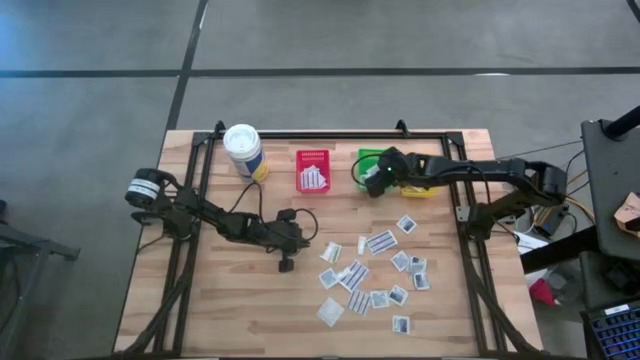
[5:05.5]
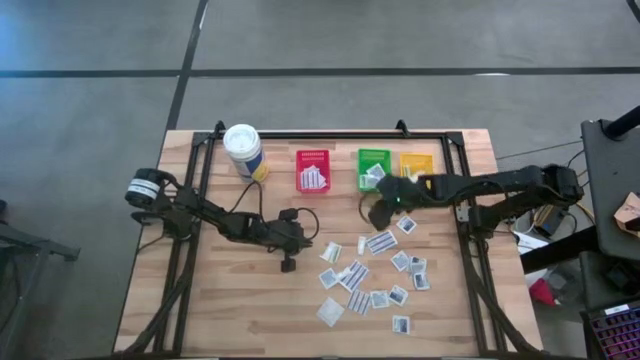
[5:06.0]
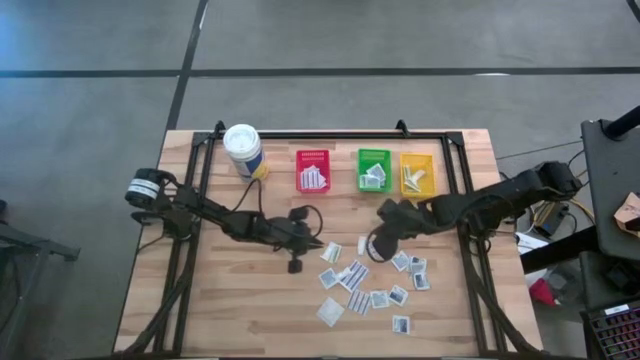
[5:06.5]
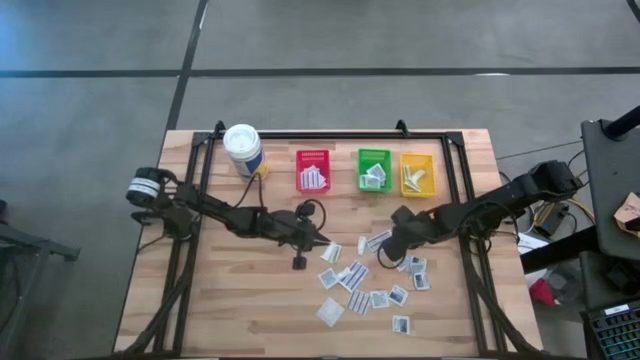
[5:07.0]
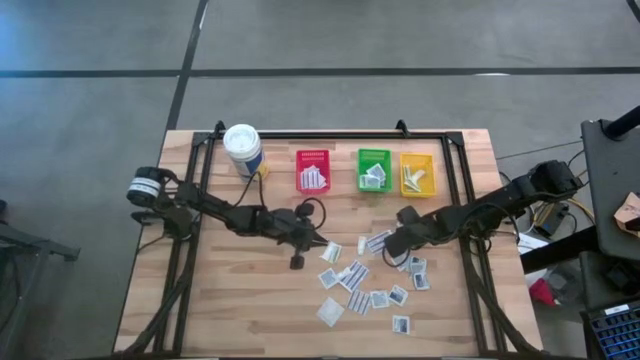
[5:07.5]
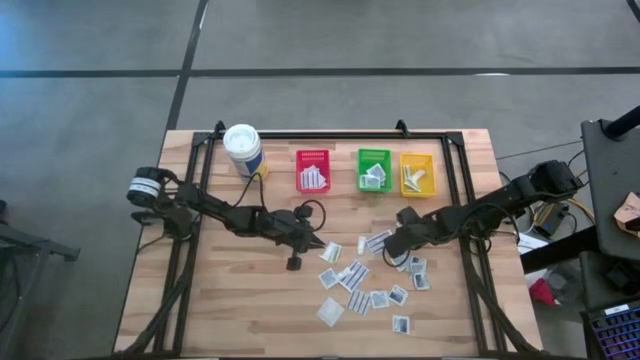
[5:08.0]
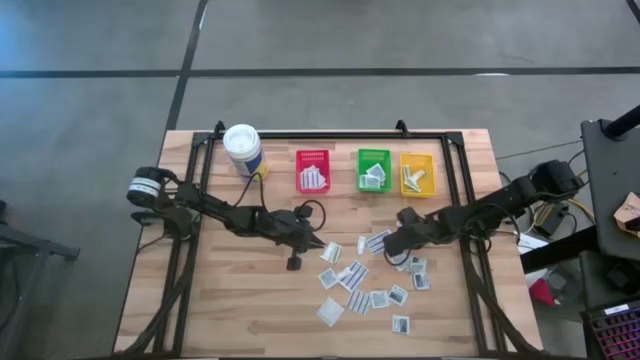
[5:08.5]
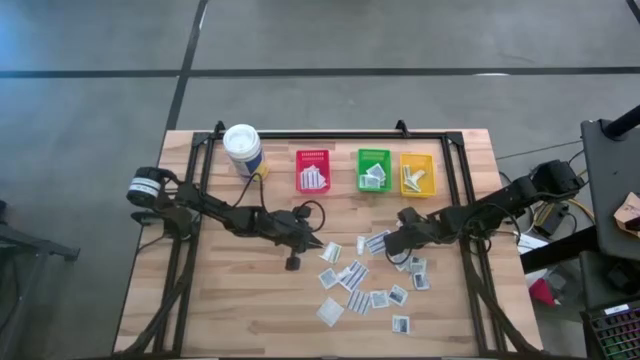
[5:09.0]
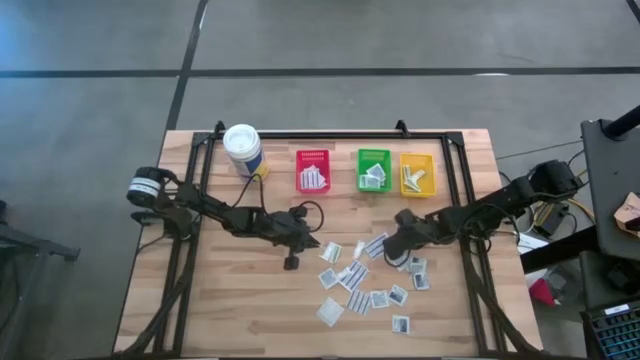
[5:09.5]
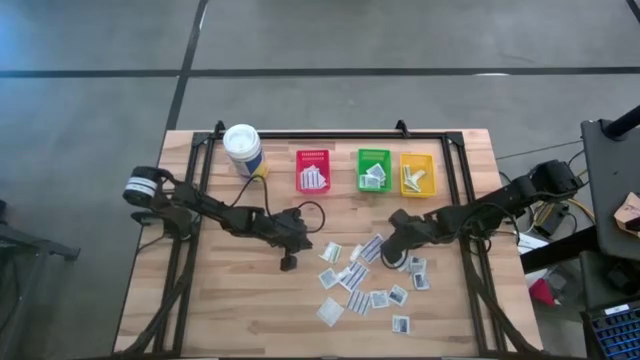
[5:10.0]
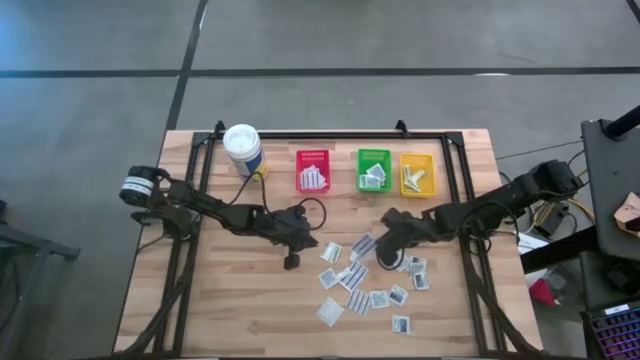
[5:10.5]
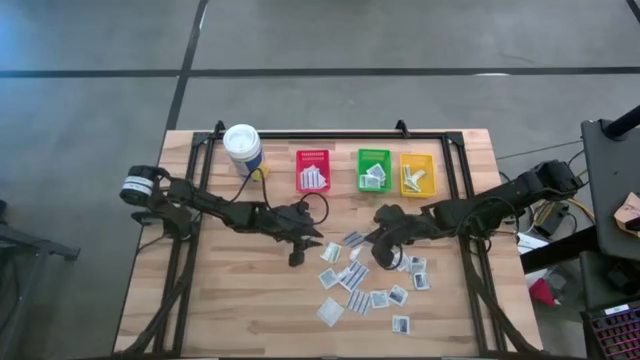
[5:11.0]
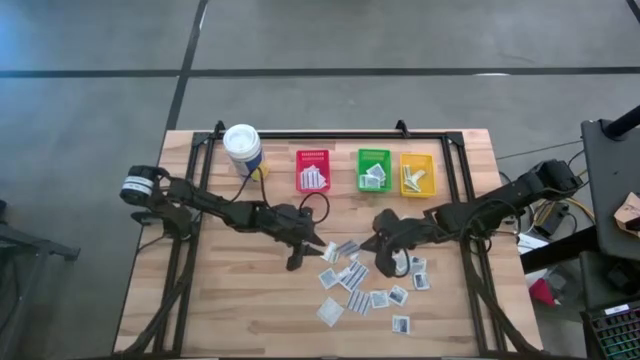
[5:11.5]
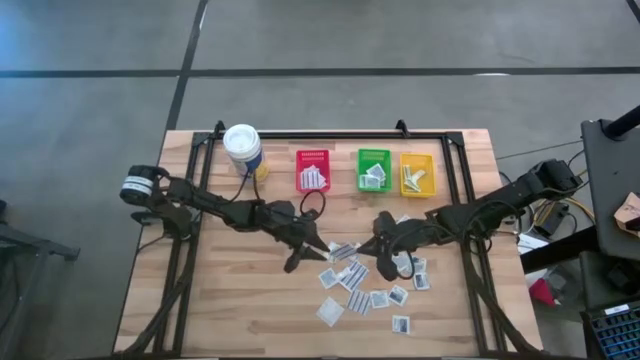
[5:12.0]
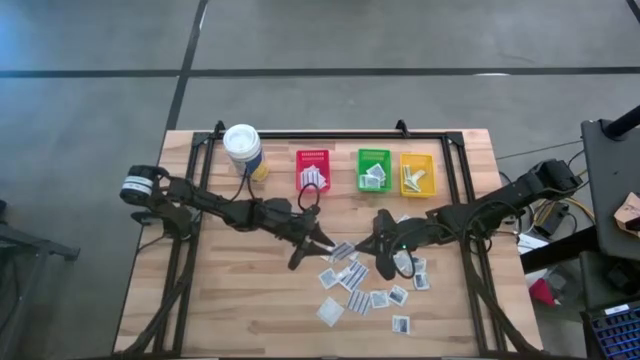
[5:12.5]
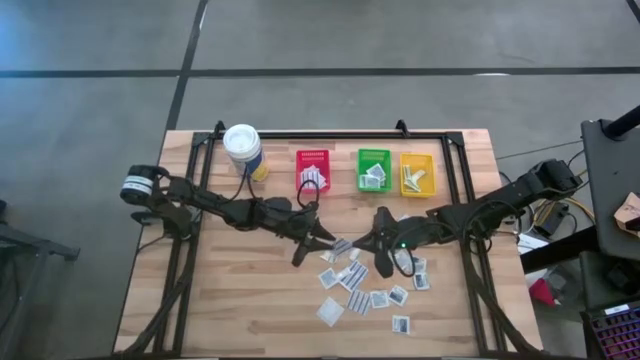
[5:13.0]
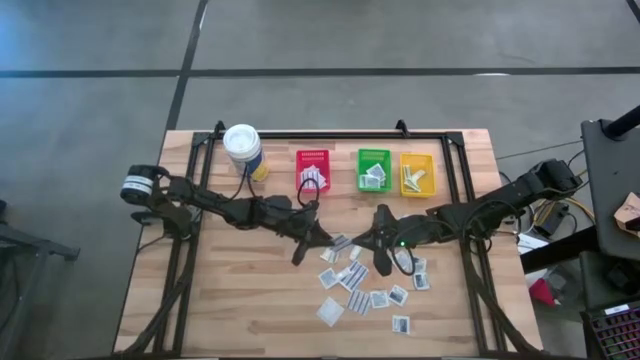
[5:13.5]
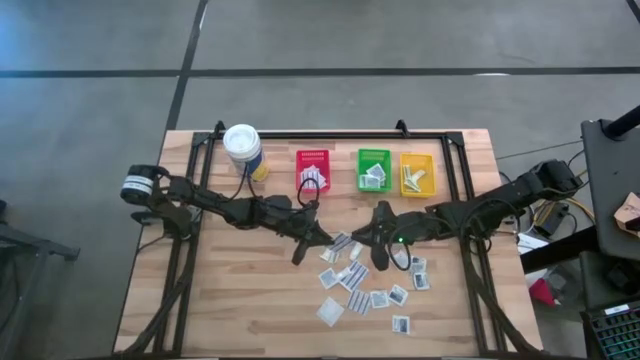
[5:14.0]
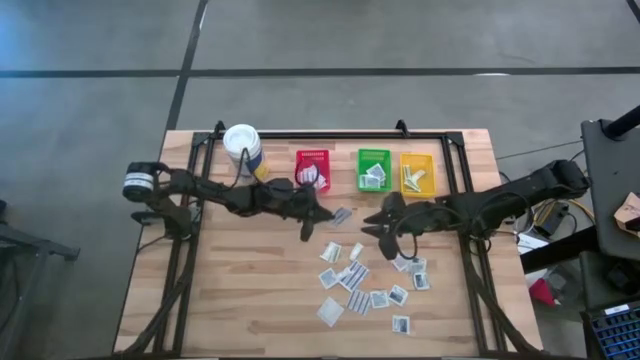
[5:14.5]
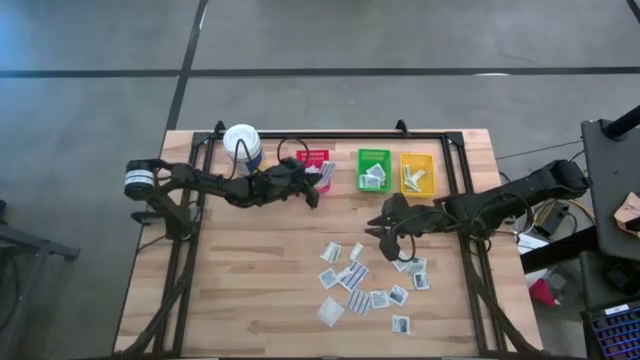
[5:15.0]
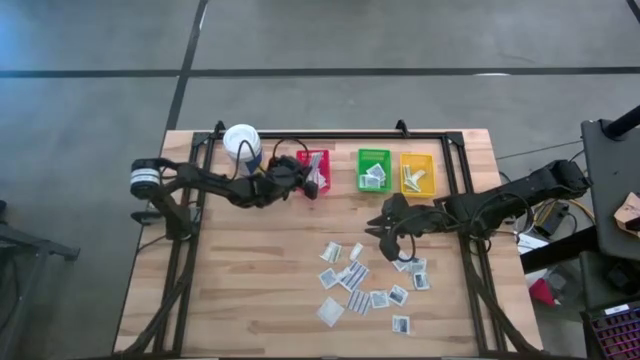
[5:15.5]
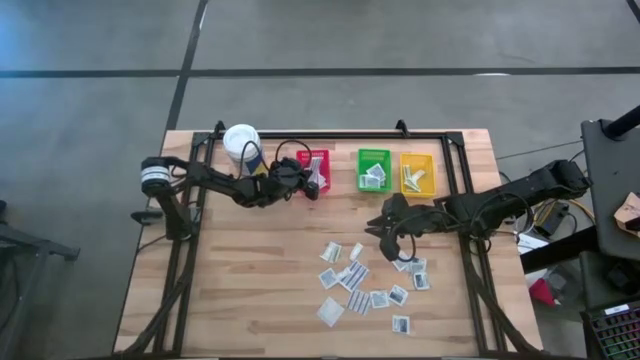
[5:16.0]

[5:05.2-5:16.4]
Task: Pick & Place First Aid Supplies
Put the blue bandage in the red bin

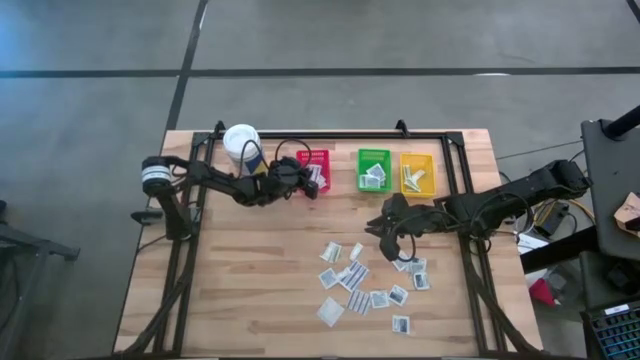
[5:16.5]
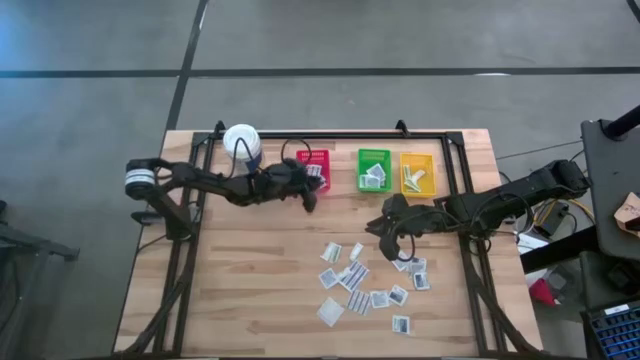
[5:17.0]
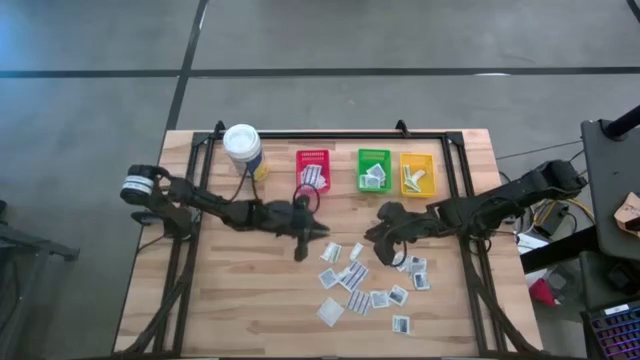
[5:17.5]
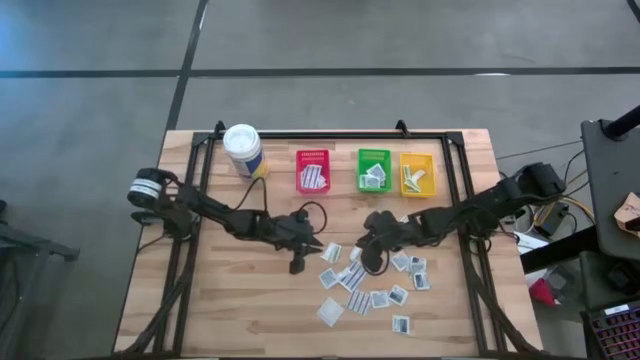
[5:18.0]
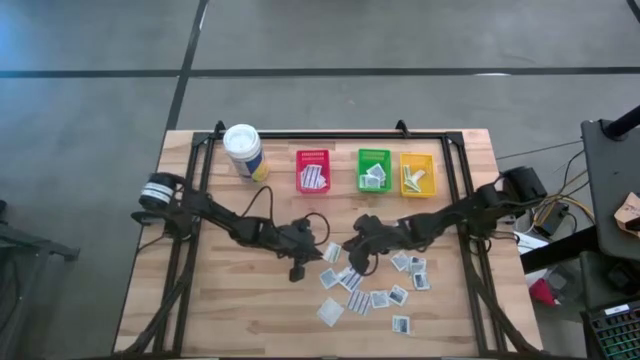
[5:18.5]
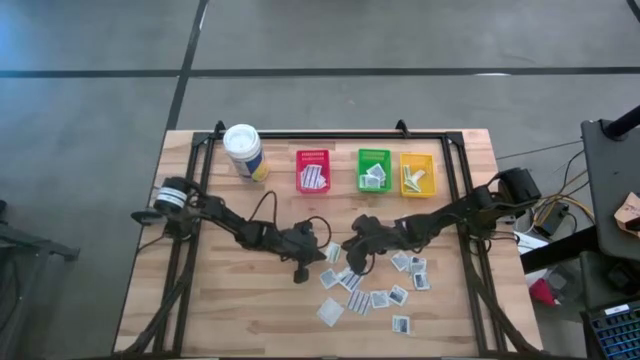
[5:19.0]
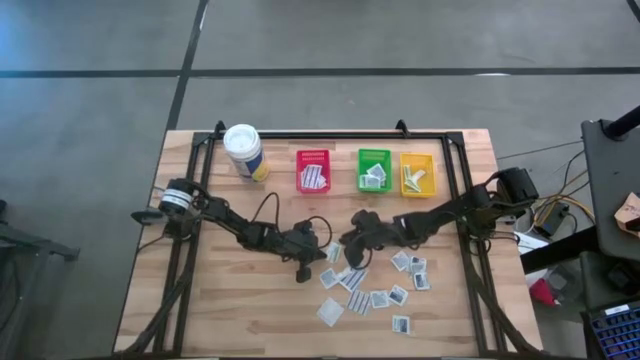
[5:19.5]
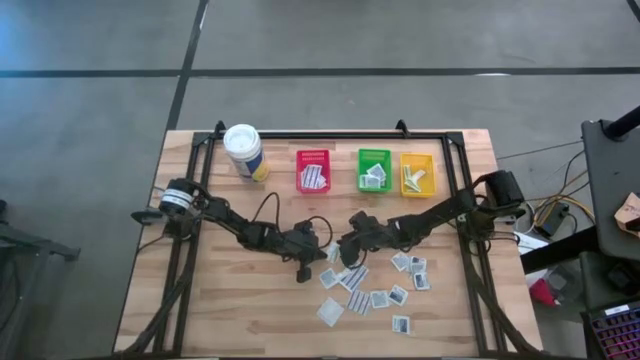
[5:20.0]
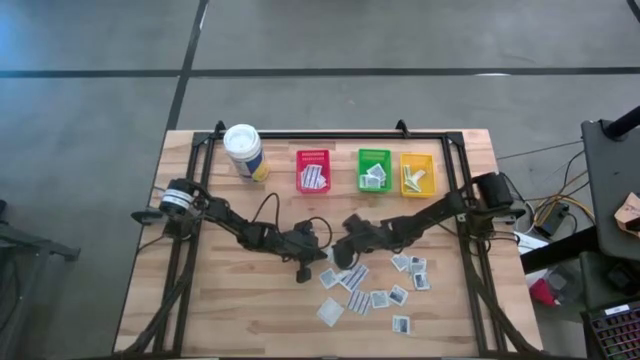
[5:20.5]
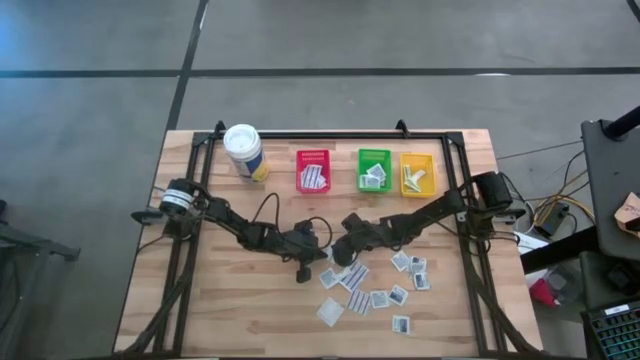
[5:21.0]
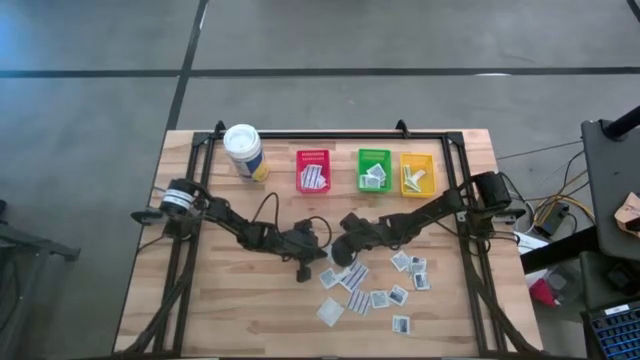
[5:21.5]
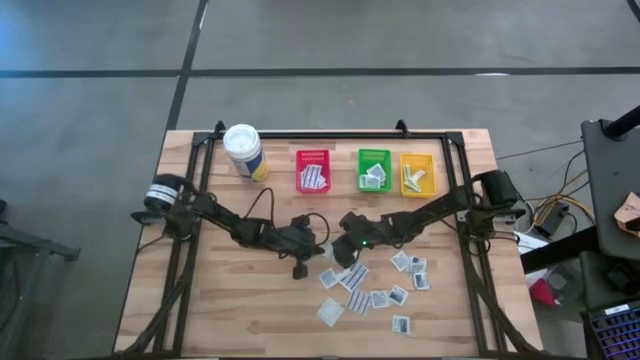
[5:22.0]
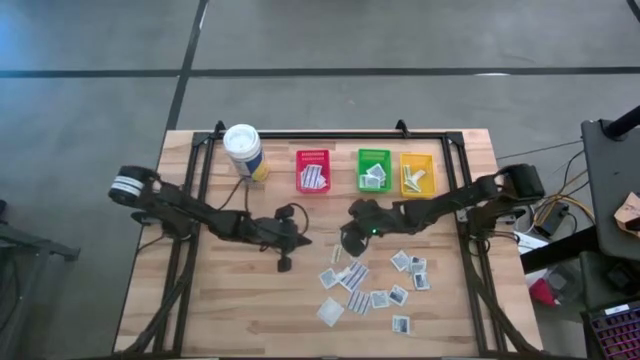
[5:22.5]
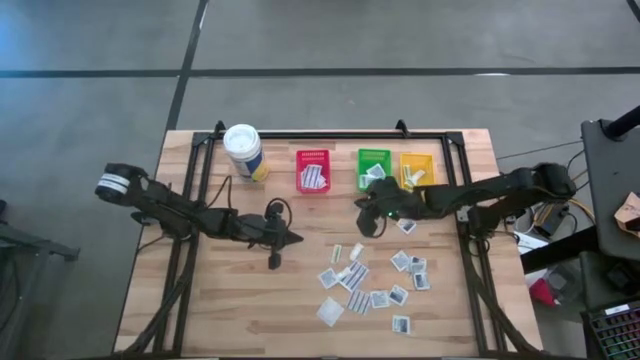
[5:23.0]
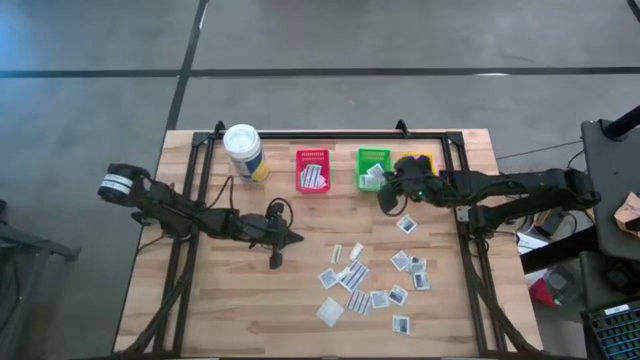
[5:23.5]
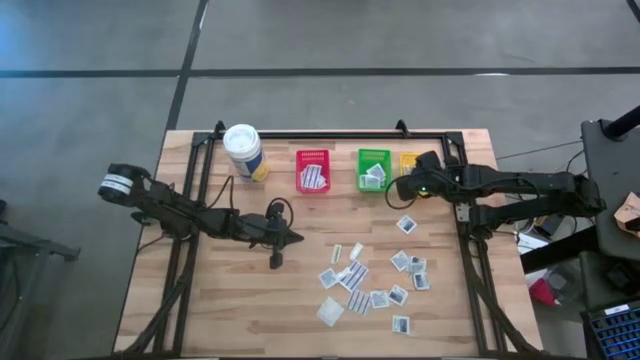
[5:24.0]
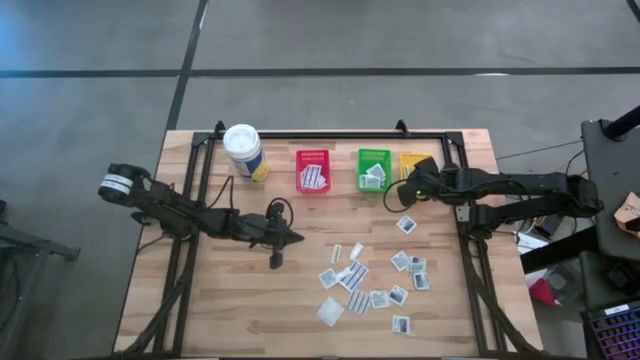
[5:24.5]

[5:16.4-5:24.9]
Put the green bandage in the yellow bin
